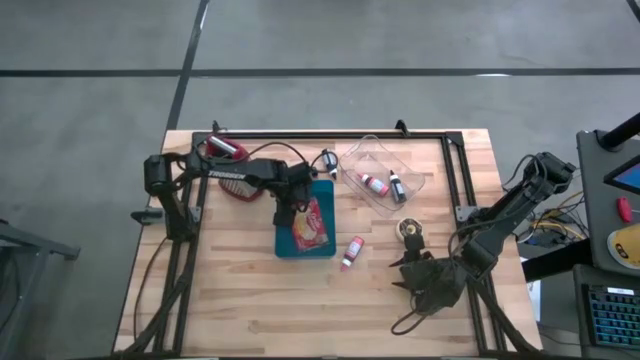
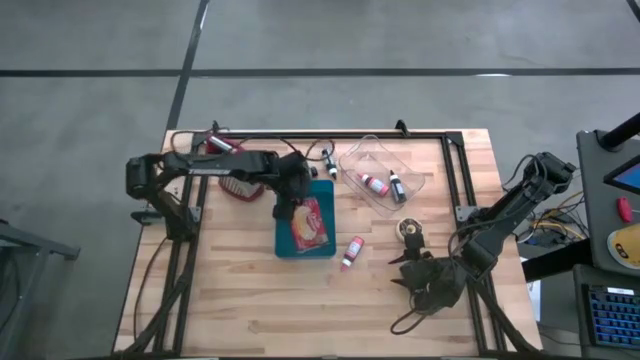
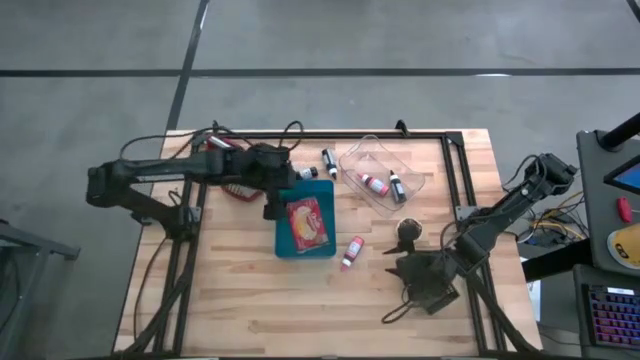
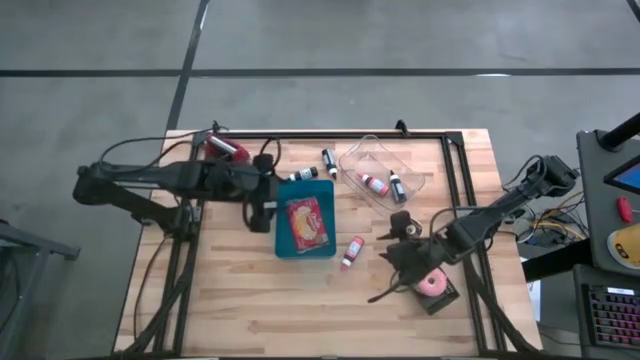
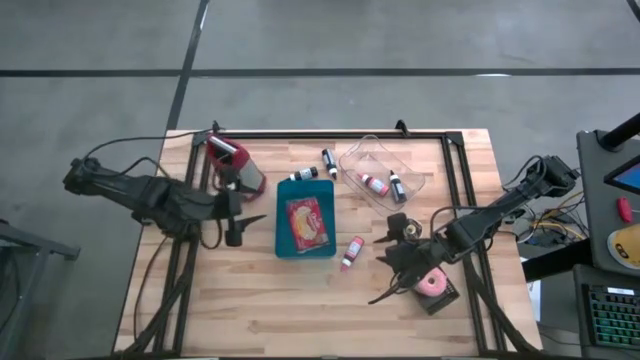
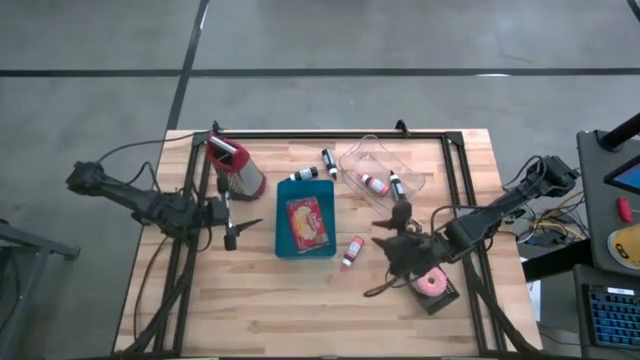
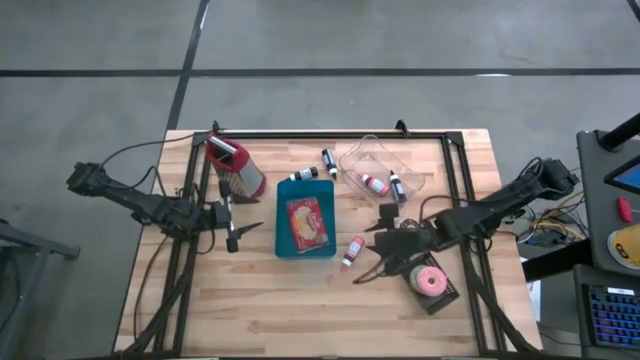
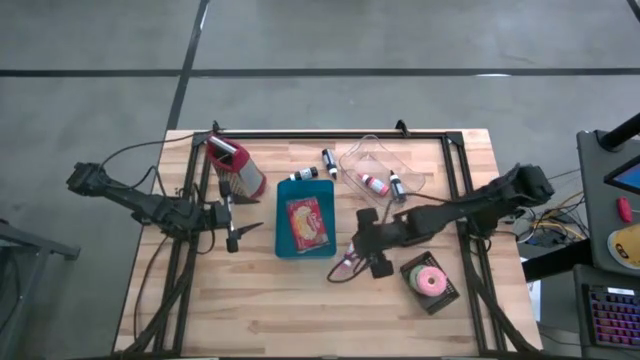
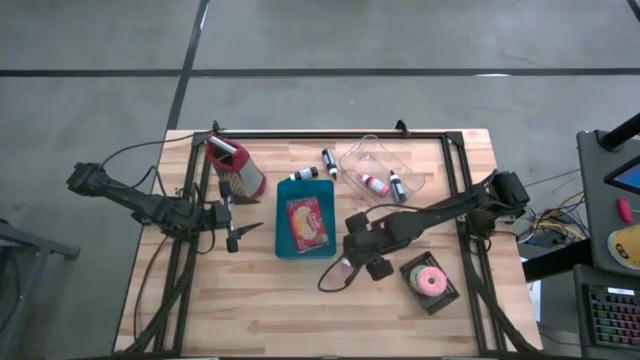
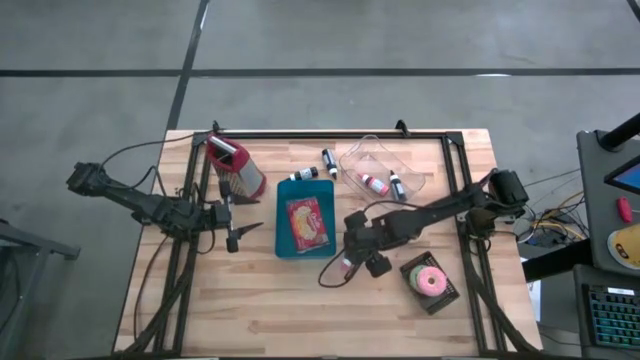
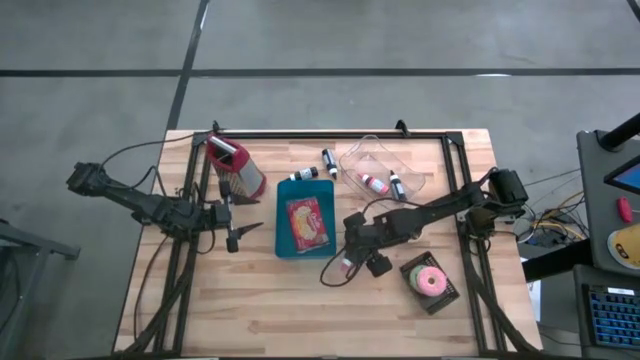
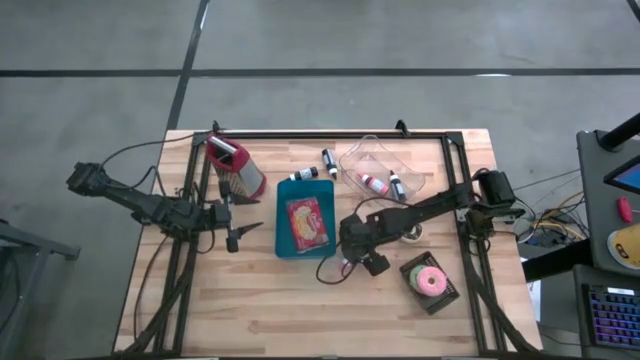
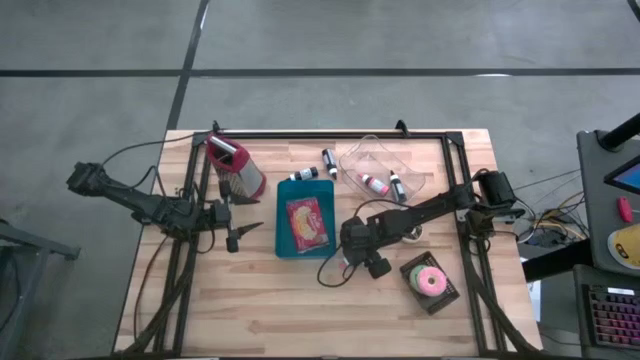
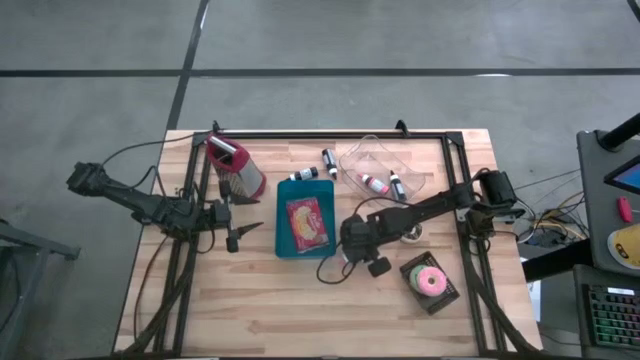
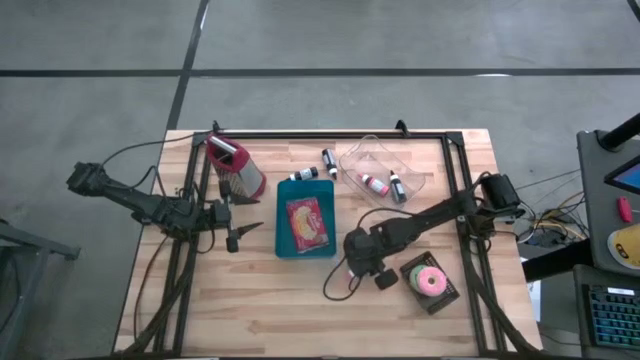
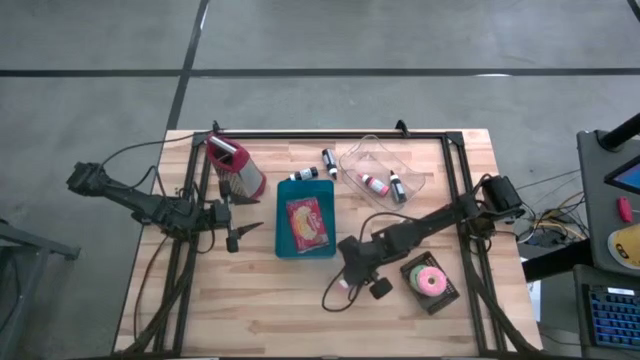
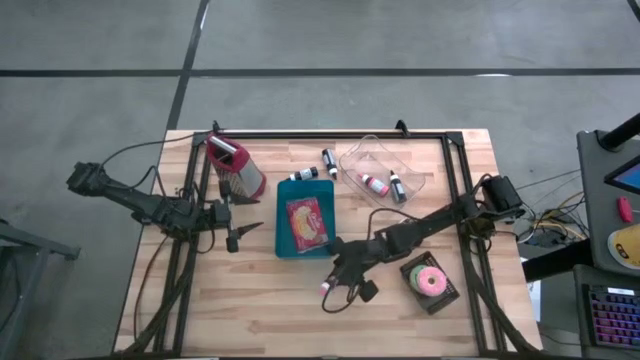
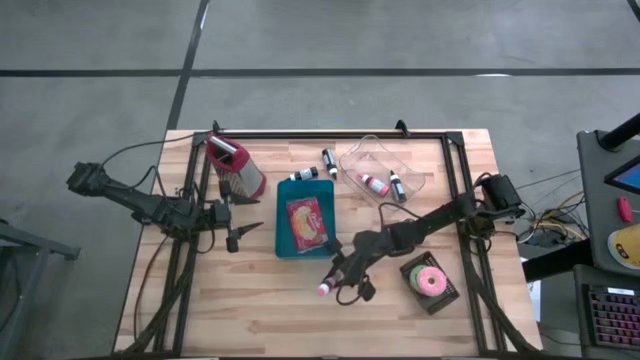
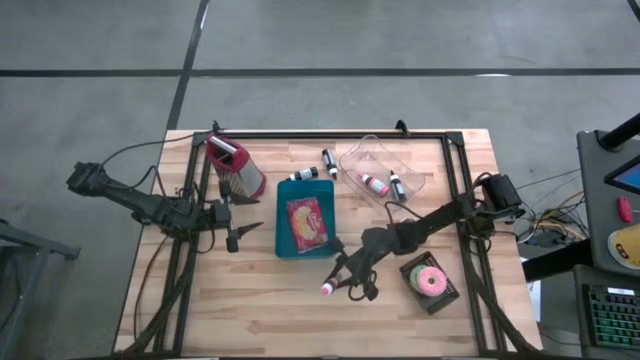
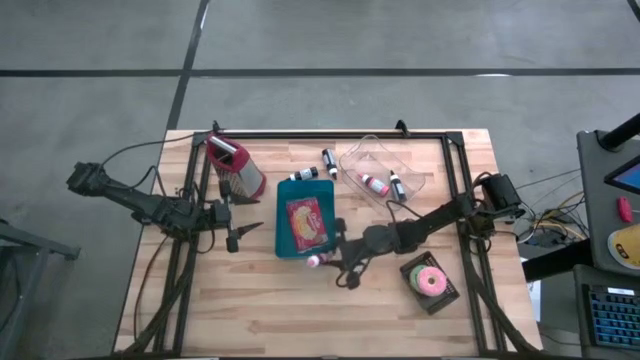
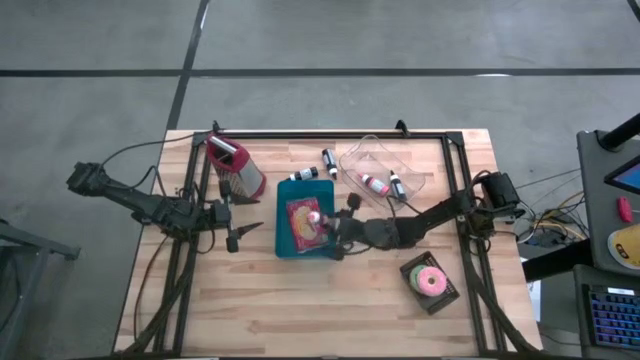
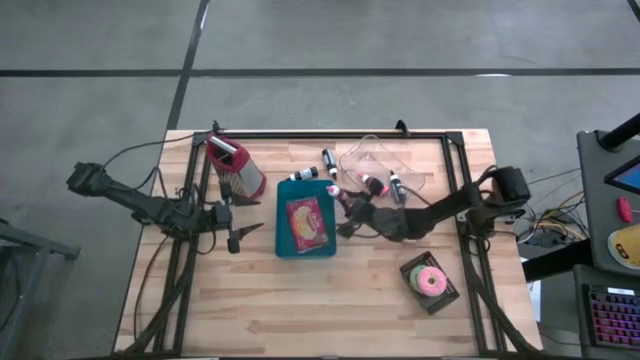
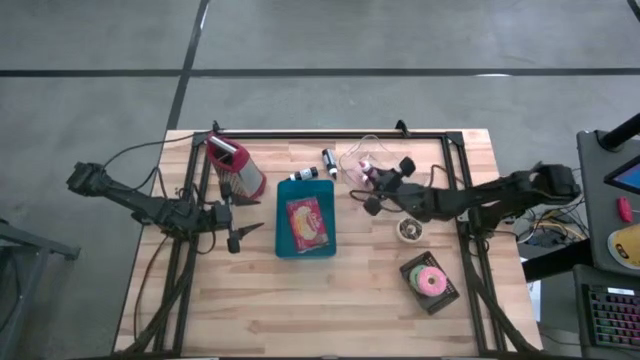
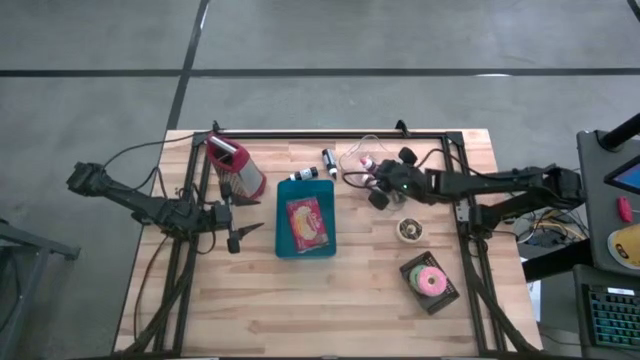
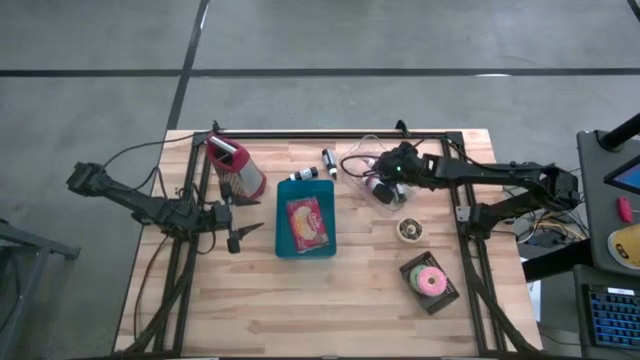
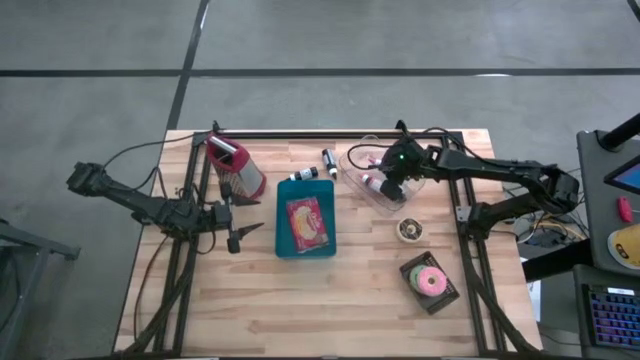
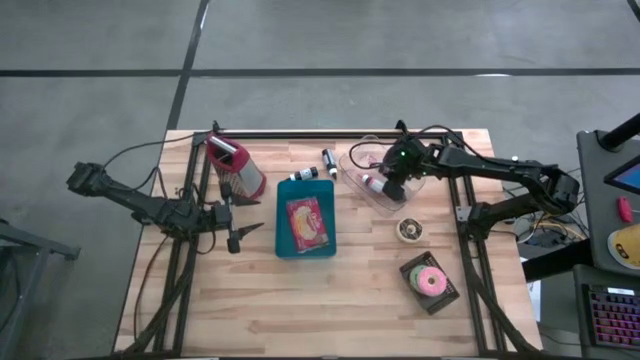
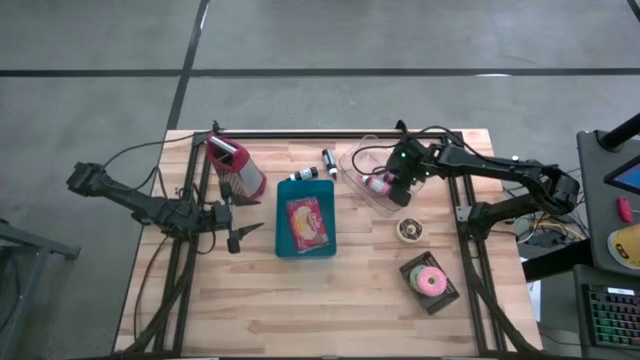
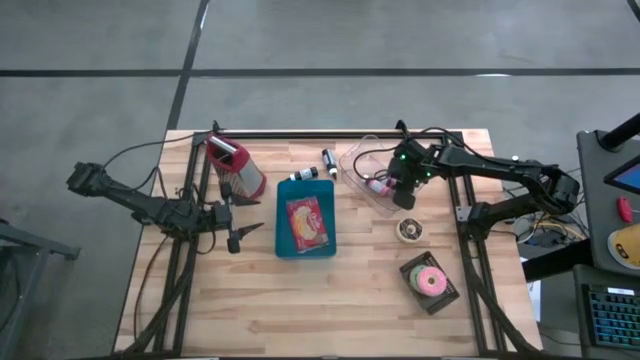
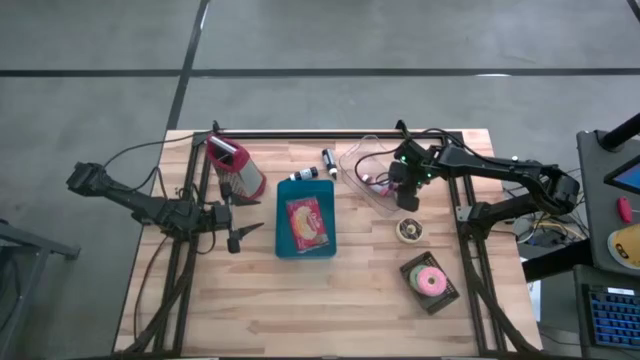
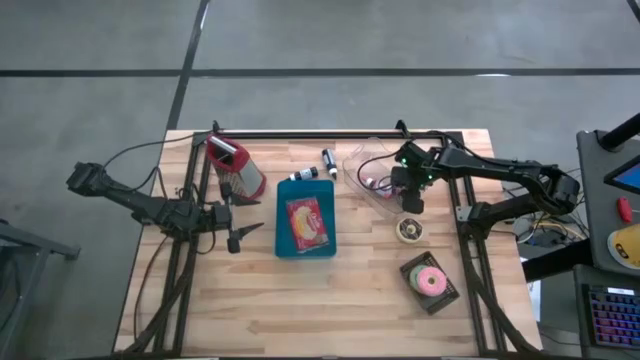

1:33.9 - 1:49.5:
Task: Pick & Place Food Item
Put the pink food coloring bottle into the transparent bin

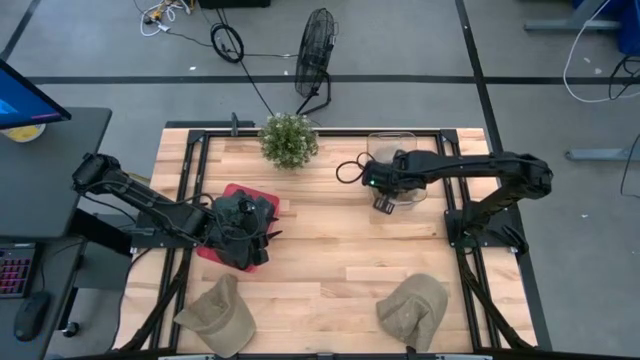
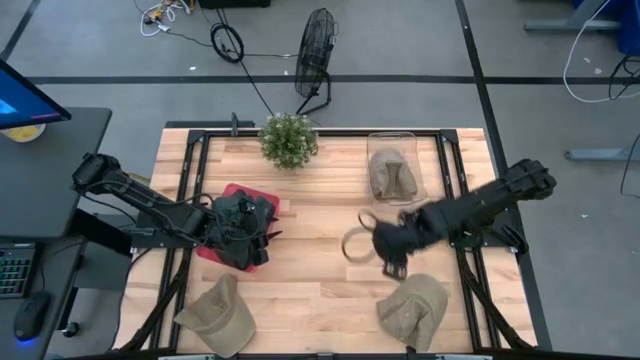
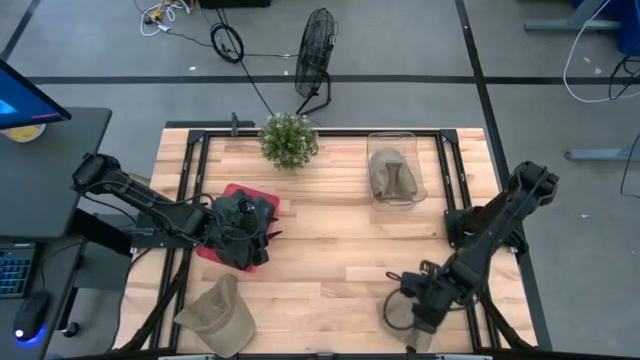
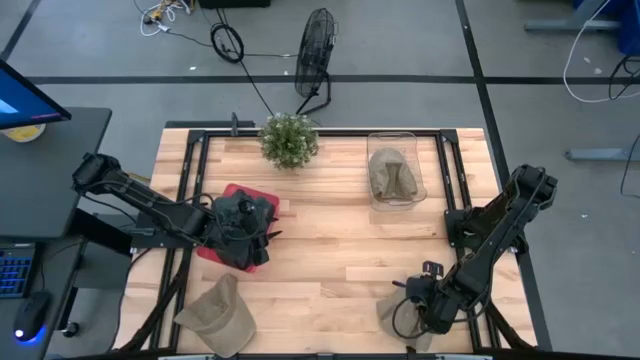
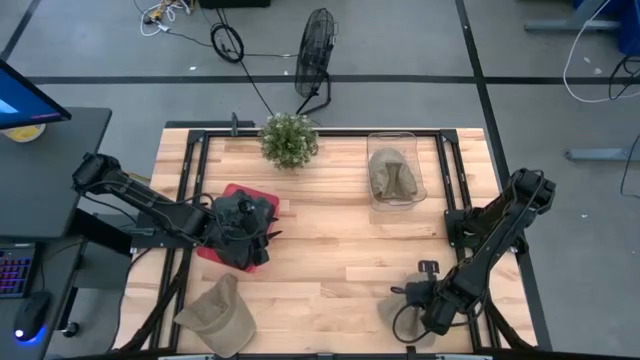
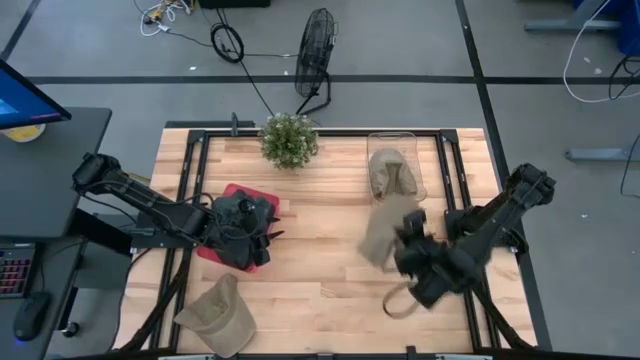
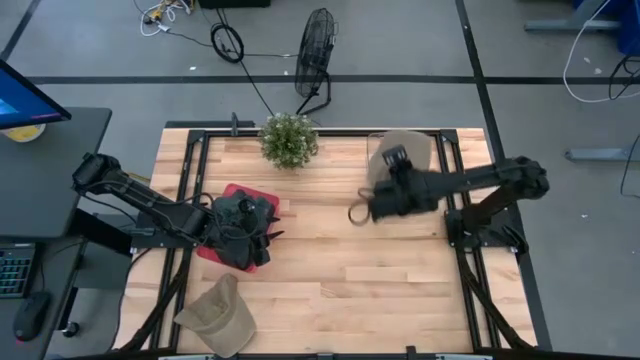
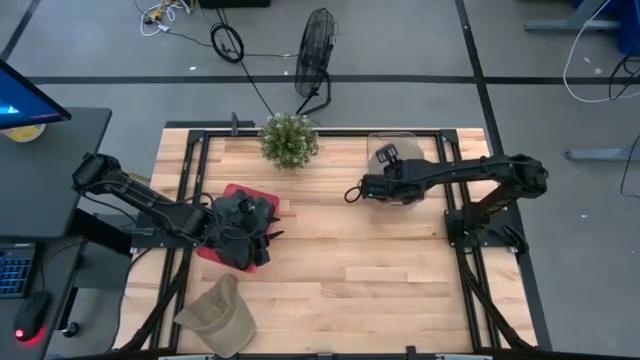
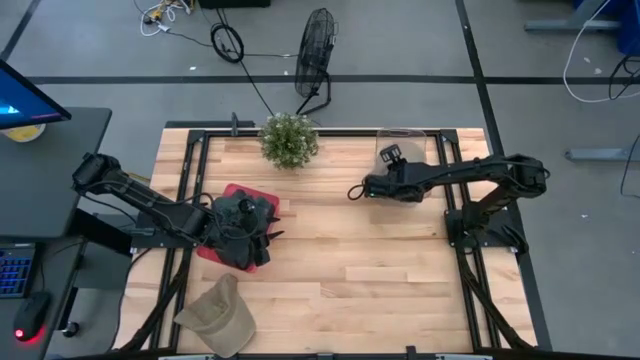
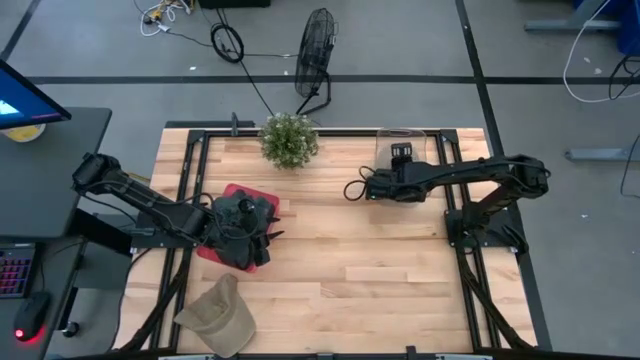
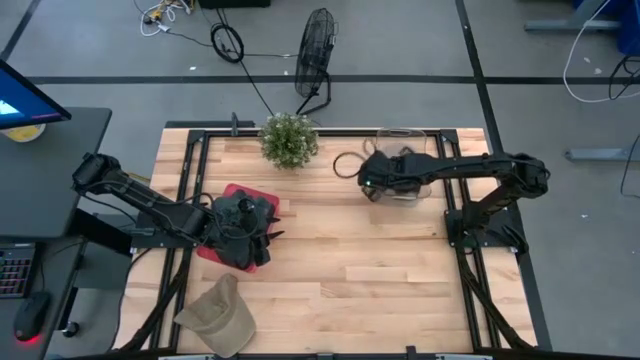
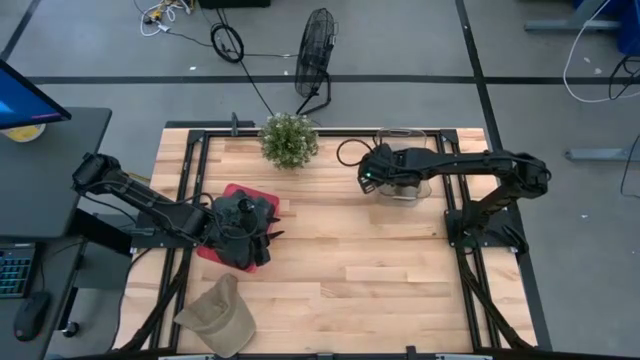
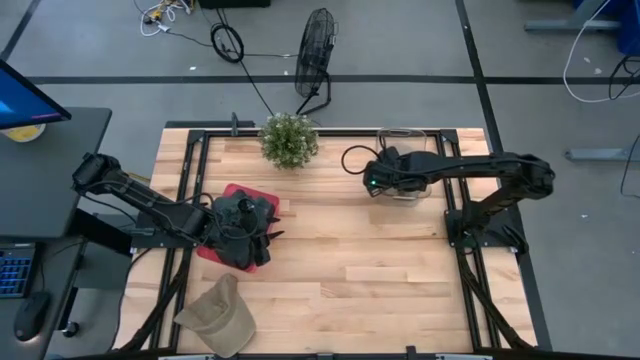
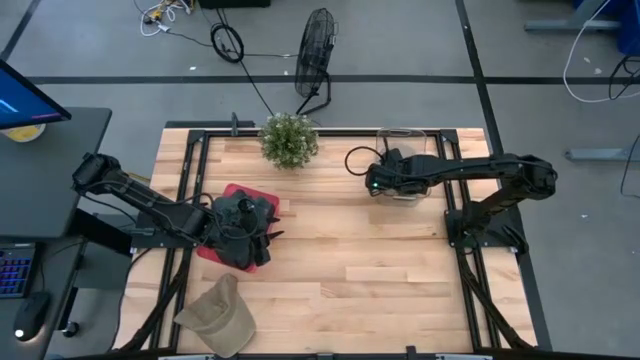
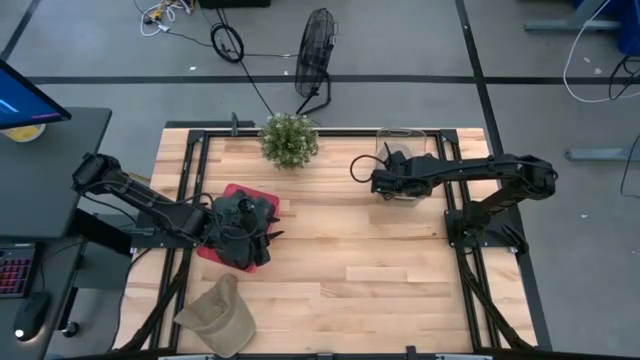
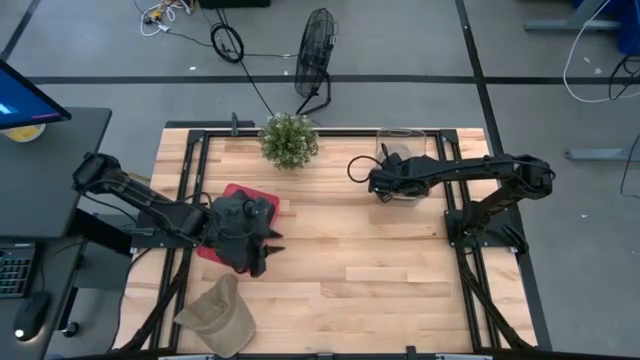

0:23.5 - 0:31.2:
Task: Pick & Place hat
Put the right brown cap into the transparent bin
